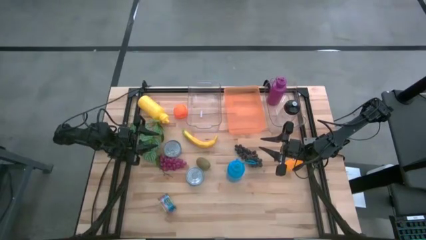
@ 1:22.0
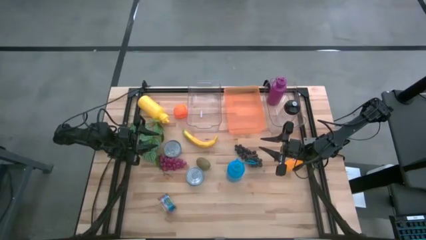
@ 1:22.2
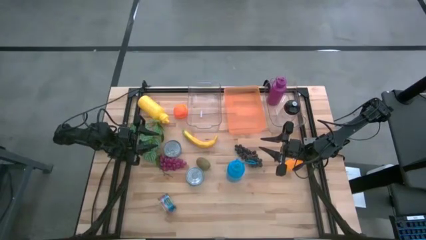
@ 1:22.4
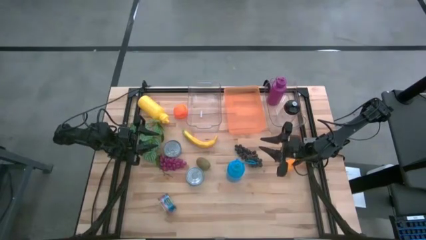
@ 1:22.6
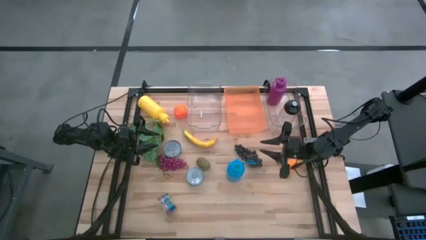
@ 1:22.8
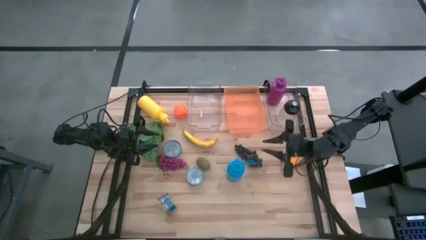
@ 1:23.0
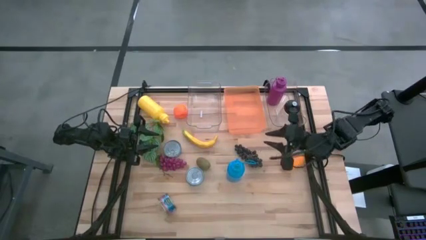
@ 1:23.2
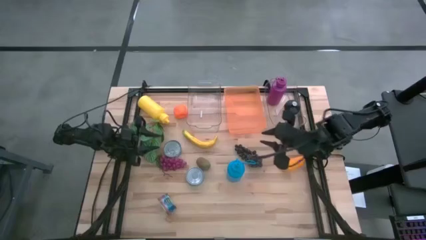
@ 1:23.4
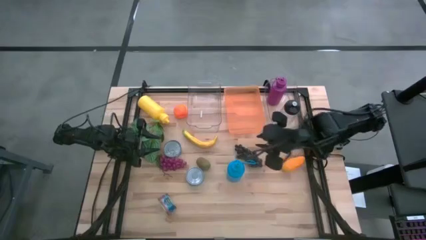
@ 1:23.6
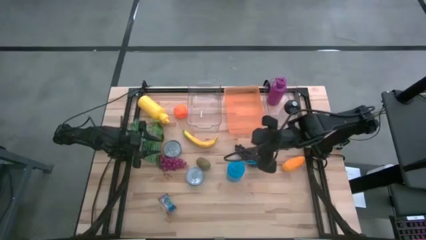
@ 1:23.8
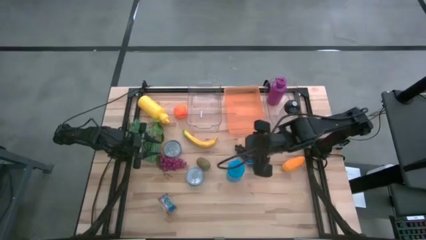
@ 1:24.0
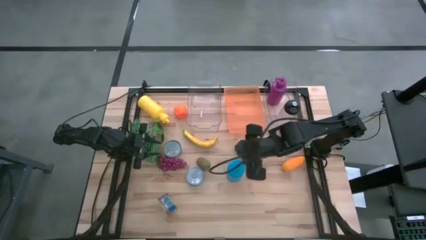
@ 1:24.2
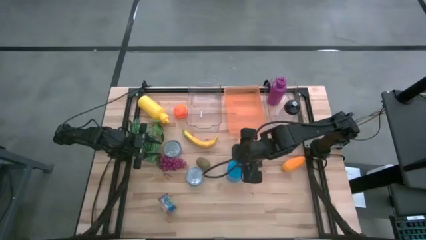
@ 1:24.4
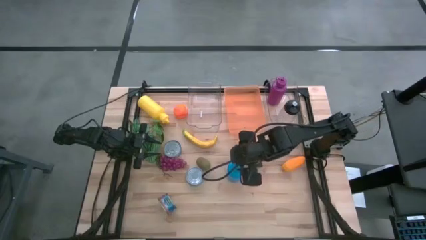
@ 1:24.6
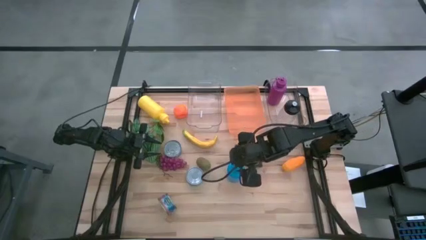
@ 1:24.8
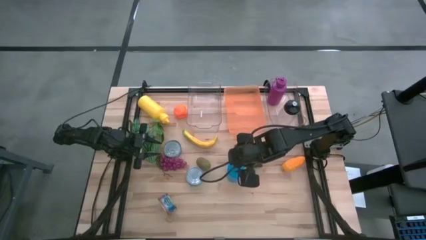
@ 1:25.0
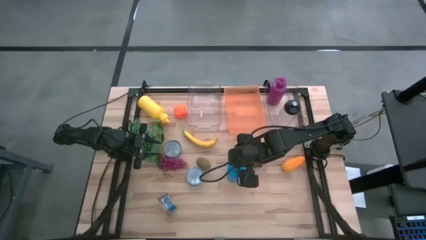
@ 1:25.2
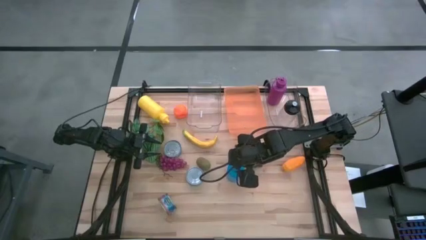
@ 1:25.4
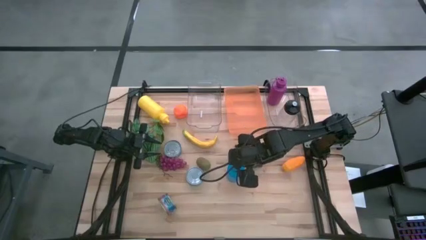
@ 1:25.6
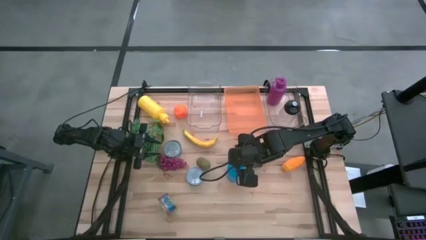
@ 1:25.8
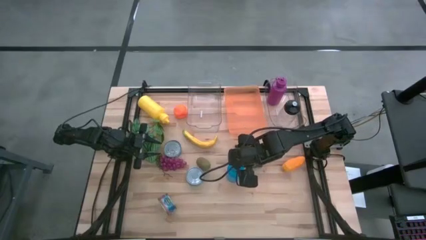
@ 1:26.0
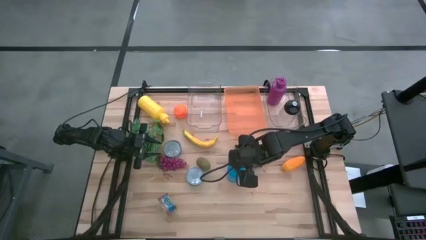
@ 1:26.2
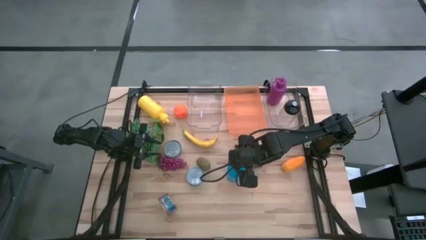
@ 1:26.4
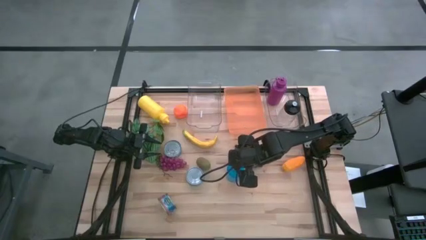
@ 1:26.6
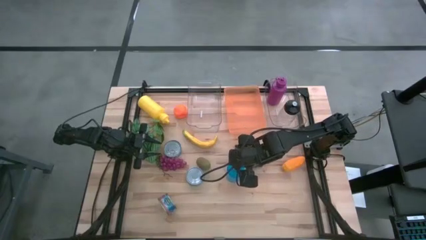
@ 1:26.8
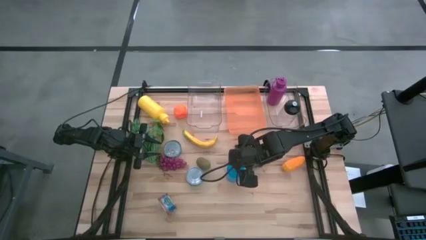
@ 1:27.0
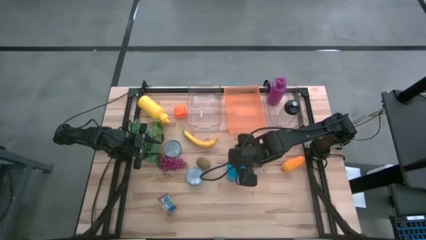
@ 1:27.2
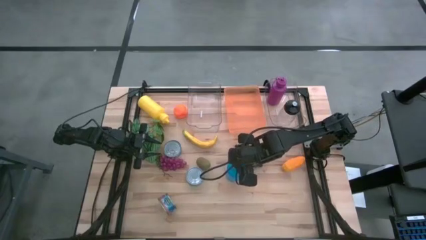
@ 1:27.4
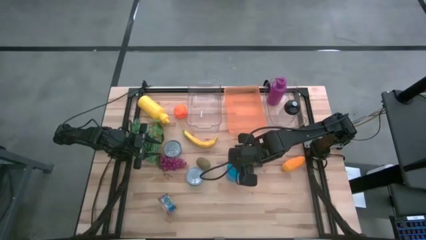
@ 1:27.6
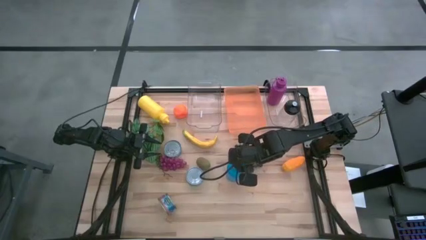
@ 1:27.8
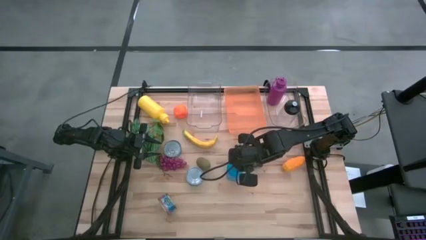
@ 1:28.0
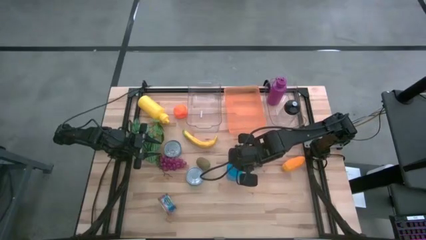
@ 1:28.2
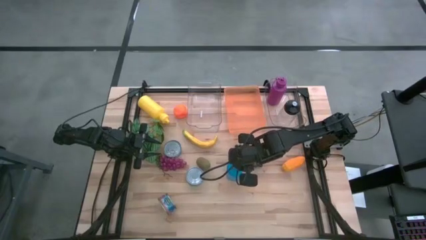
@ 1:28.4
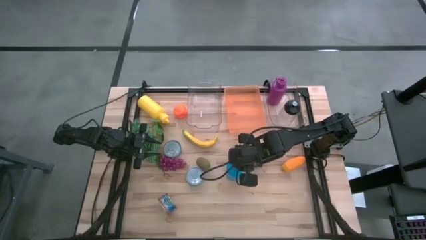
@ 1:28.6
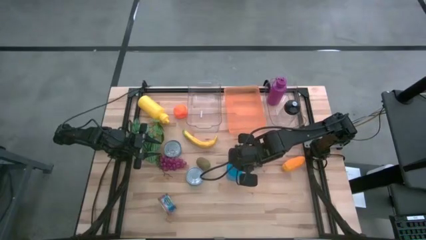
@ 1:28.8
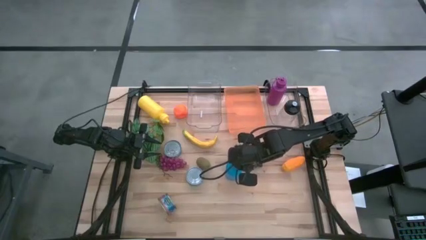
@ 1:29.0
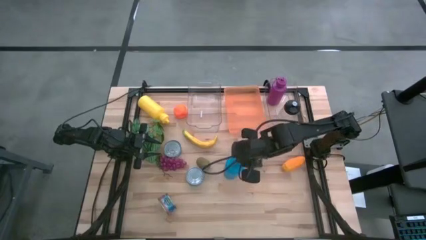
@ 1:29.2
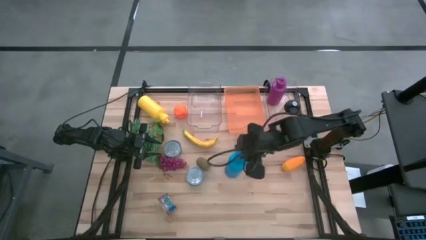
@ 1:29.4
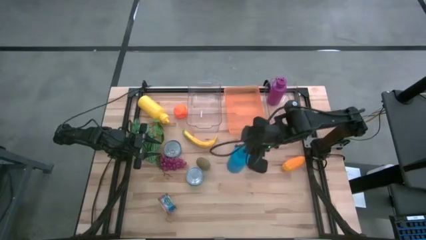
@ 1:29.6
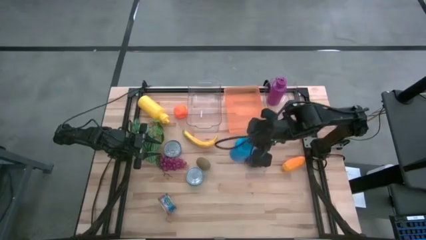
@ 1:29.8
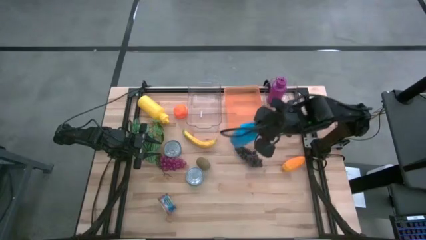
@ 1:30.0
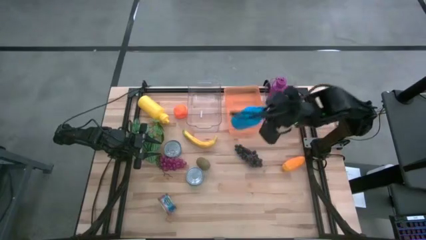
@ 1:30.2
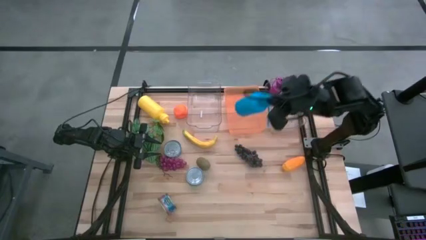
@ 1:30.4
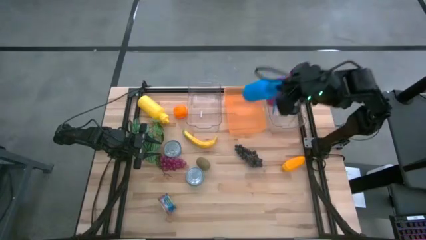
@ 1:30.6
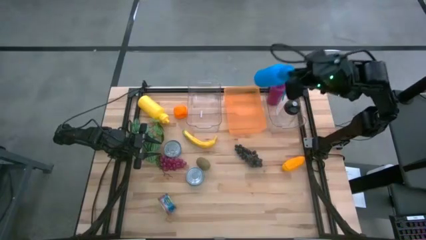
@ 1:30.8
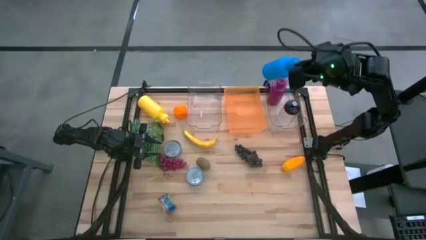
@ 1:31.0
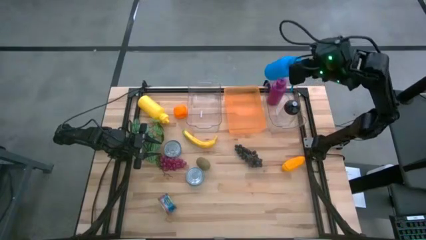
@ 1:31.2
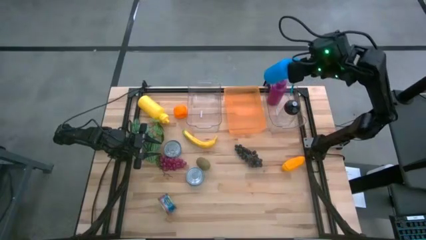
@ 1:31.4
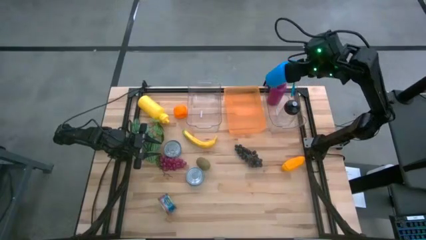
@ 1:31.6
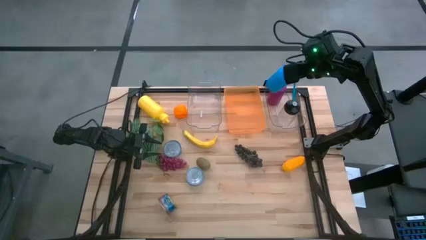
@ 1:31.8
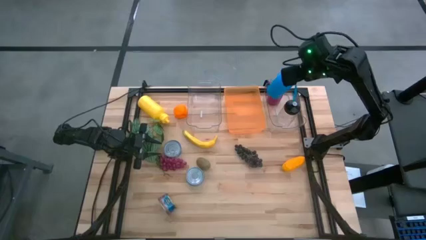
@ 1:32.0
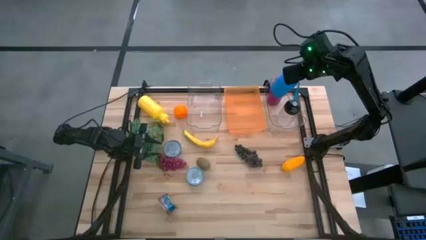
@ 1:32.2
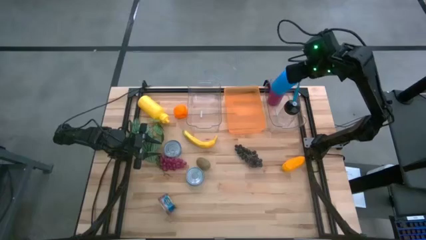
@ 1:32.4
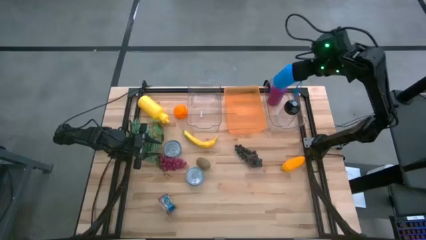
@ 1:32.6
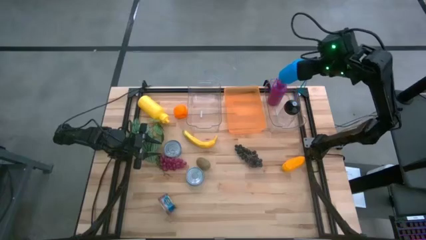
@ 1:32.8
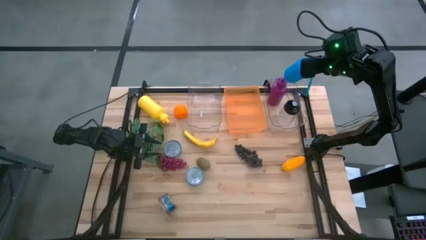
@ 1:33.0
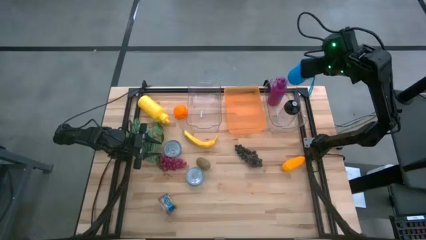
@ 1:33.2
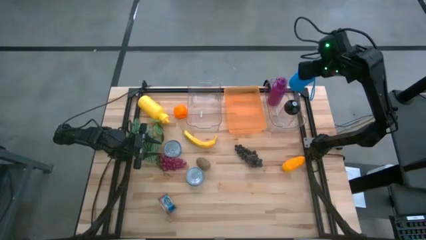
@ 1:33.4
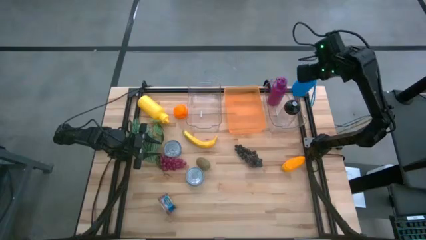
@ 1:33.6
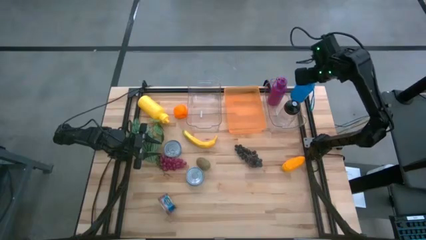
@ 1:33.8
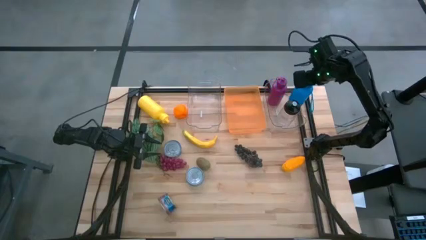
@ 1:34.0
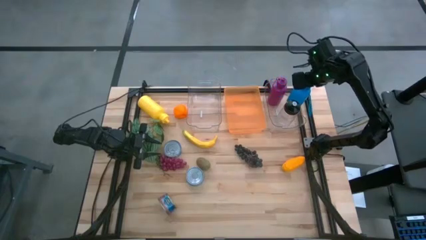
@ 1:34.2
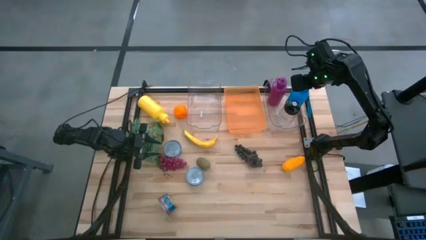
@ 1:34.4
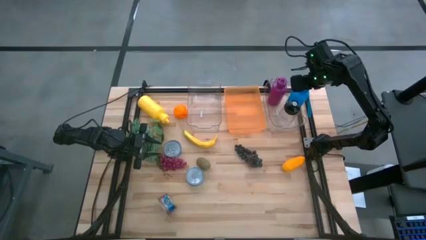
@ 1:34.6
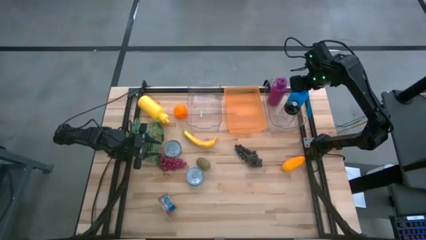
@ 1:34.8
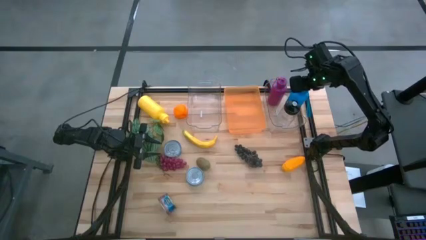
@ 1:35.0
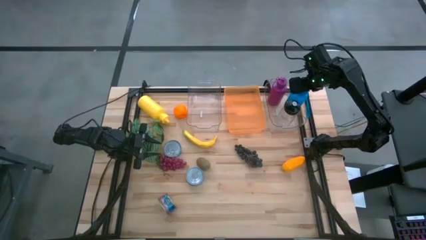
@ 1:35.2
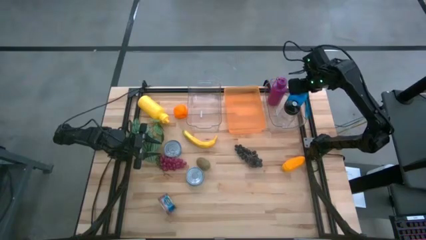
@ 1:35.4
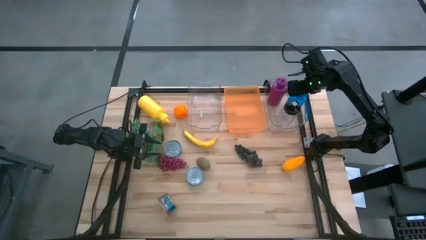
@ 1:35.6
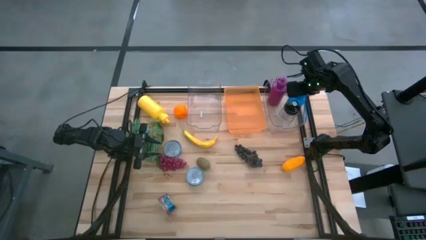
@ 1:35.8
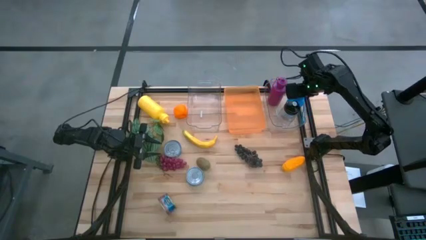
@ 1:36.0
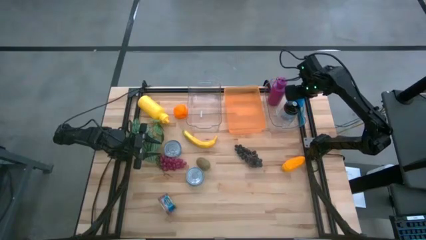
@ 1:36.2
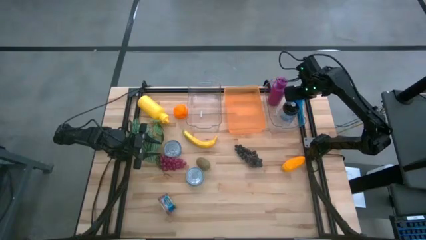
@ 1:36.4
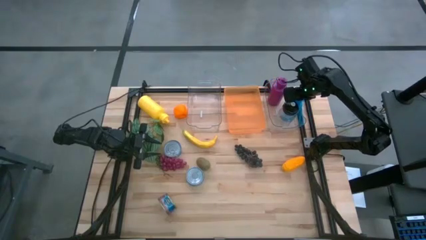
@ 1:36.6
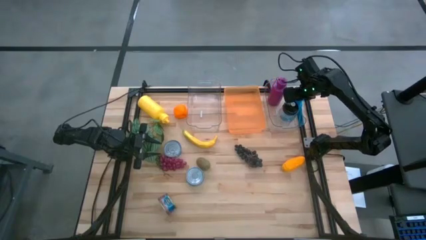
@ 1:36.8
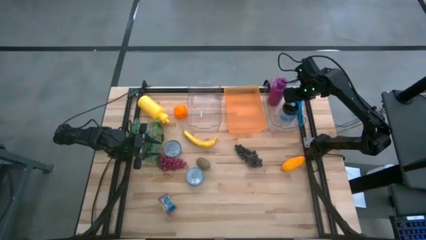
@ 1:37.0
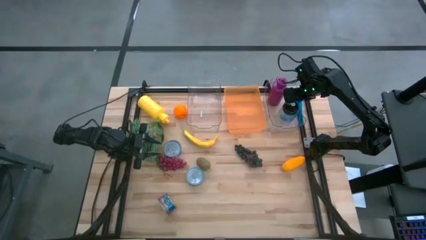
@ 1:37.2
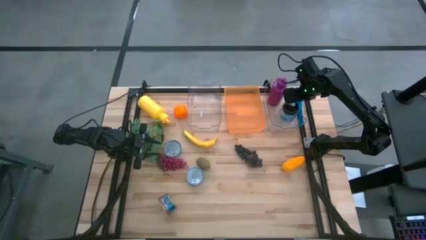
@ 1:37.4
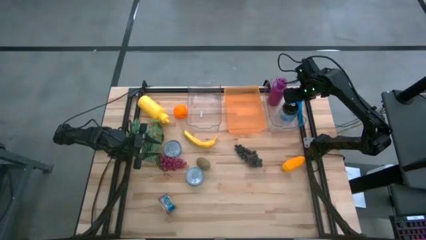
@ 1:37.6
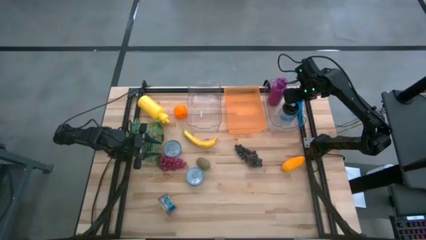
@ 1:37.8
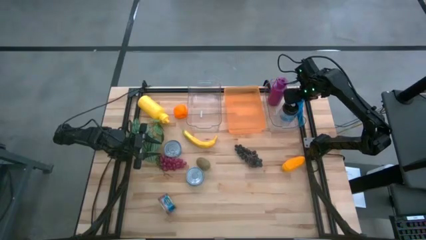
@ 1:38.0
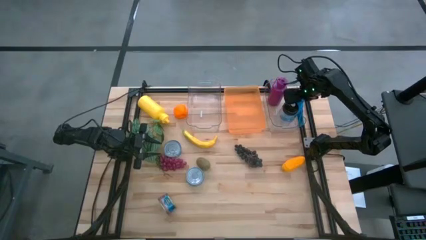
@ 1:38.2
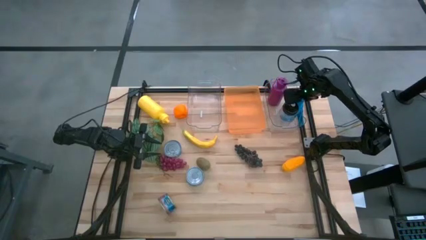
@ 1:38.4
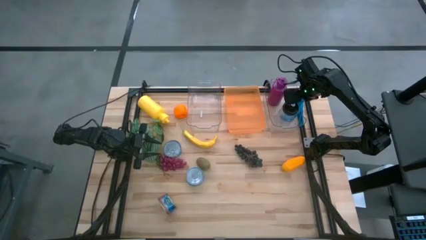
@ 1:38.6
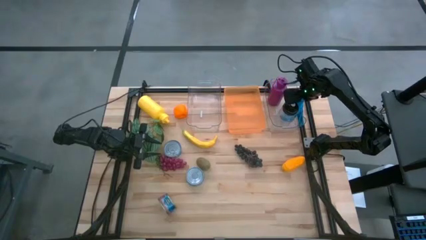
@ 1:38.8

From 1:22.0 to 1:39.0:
Task: Pick & Place Food Item
Put the blue water bottle into the right transparent bin
